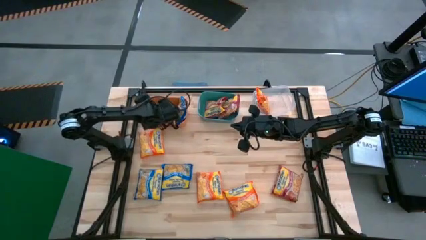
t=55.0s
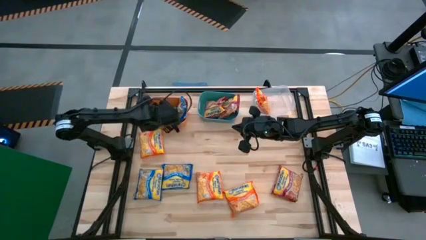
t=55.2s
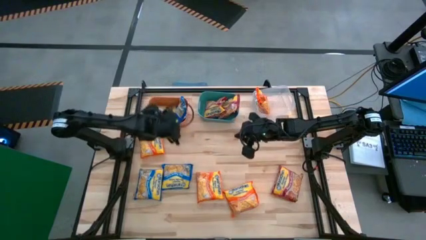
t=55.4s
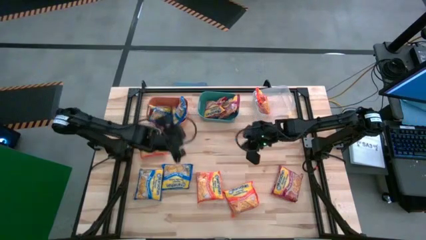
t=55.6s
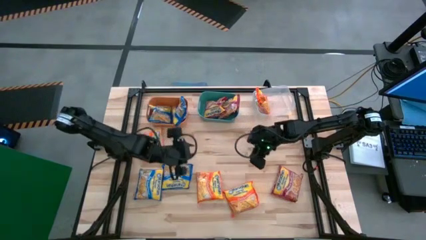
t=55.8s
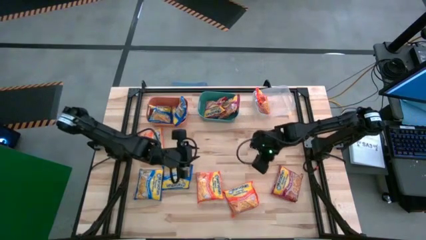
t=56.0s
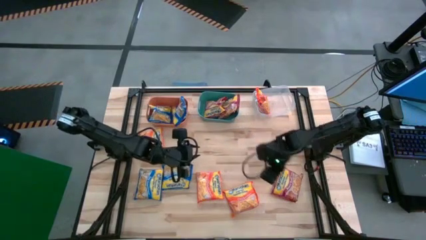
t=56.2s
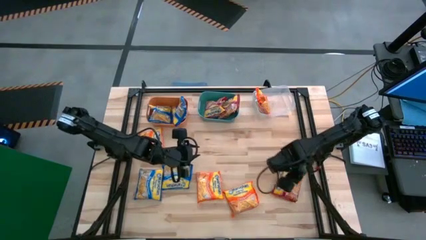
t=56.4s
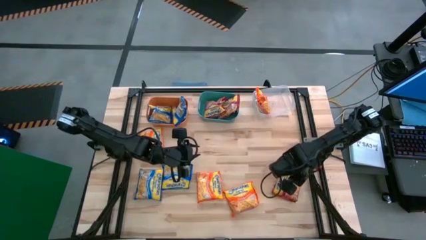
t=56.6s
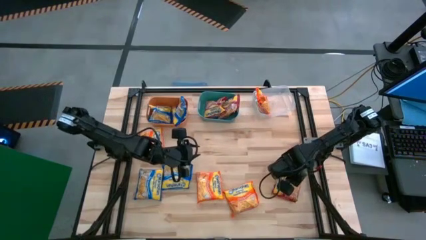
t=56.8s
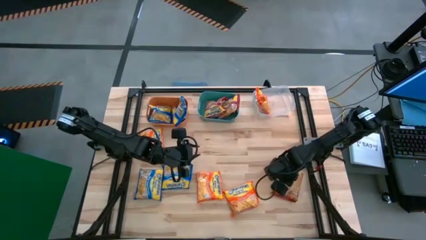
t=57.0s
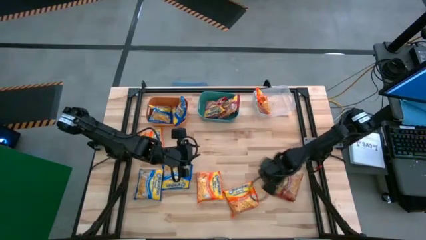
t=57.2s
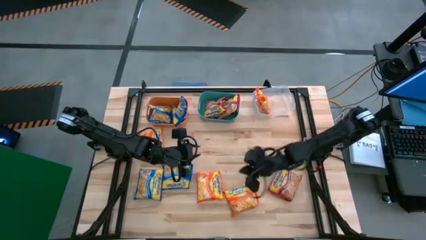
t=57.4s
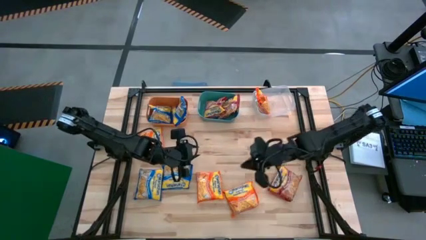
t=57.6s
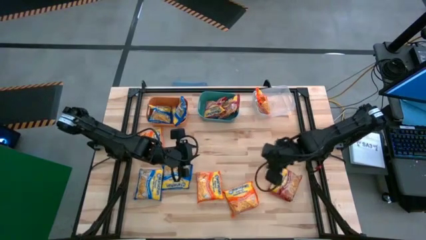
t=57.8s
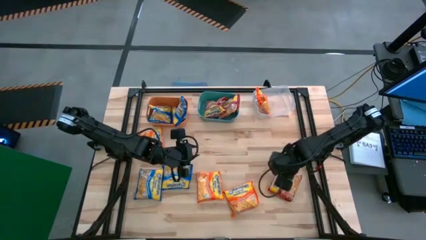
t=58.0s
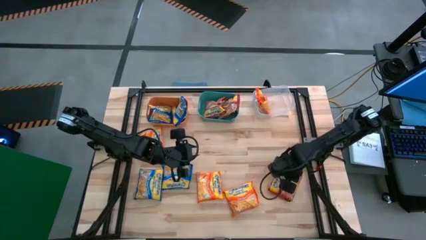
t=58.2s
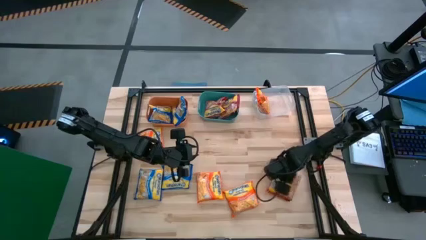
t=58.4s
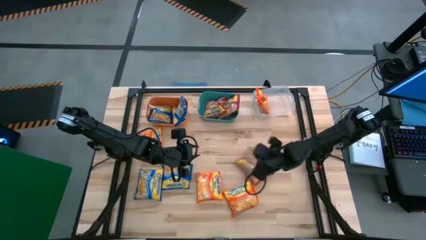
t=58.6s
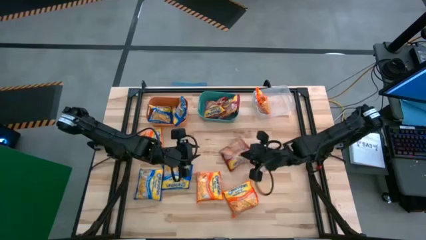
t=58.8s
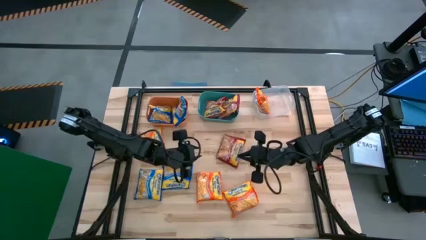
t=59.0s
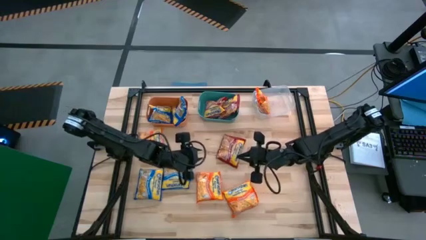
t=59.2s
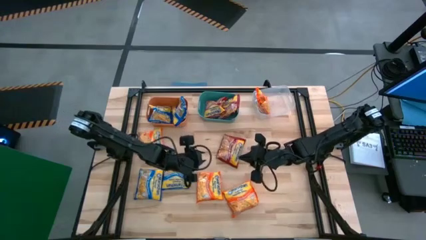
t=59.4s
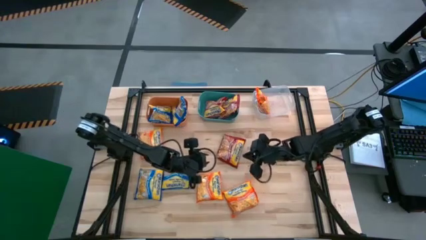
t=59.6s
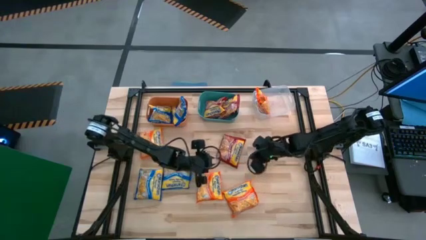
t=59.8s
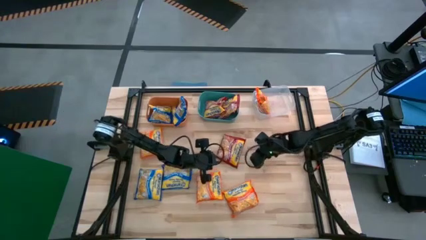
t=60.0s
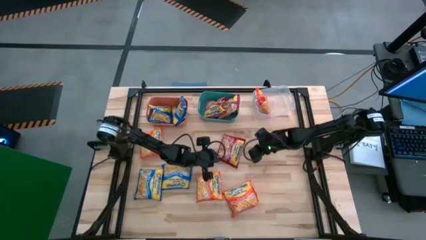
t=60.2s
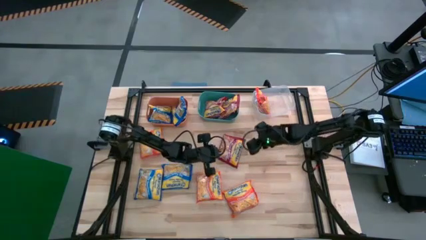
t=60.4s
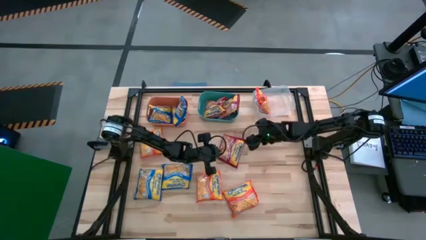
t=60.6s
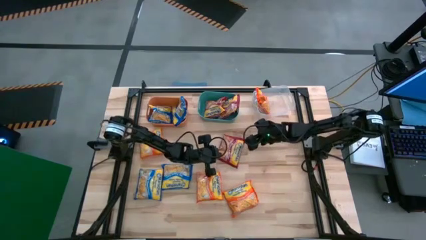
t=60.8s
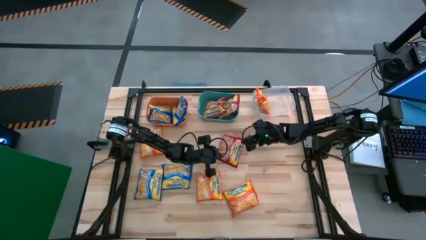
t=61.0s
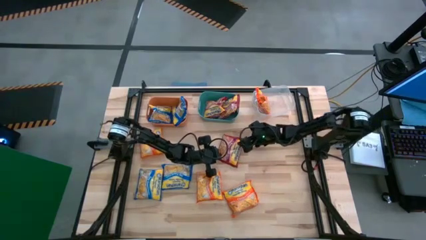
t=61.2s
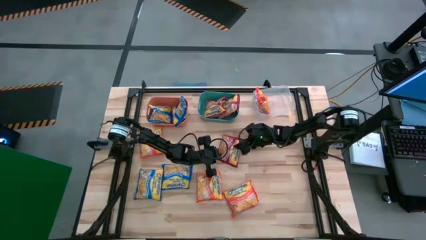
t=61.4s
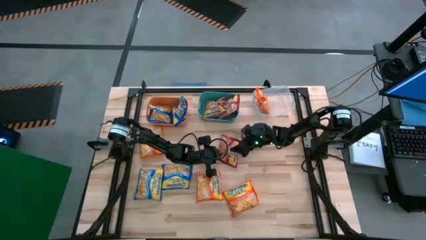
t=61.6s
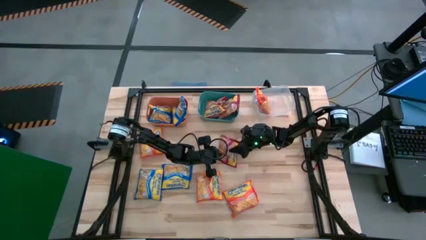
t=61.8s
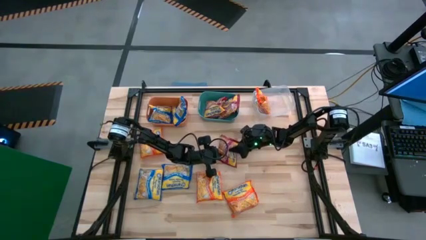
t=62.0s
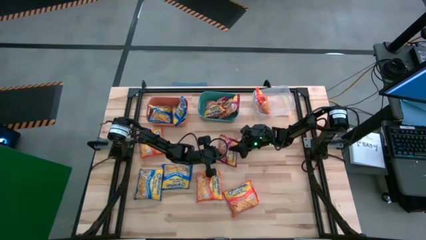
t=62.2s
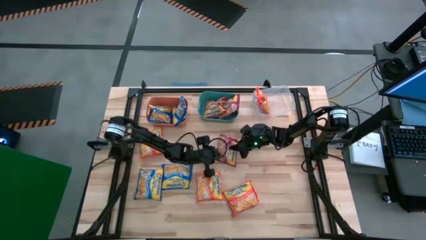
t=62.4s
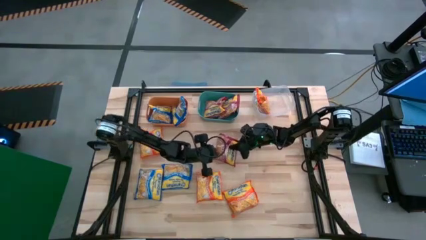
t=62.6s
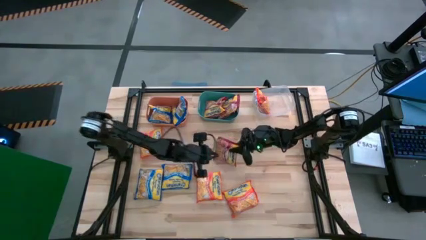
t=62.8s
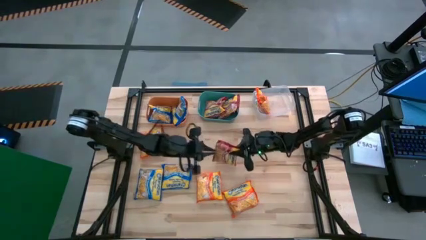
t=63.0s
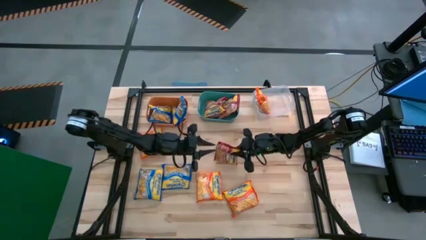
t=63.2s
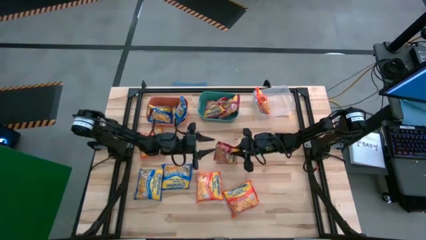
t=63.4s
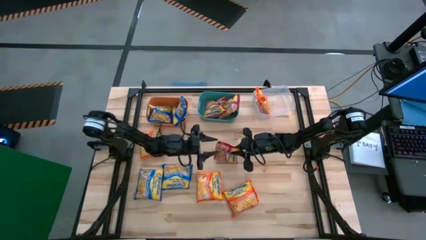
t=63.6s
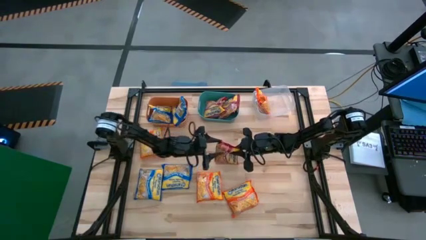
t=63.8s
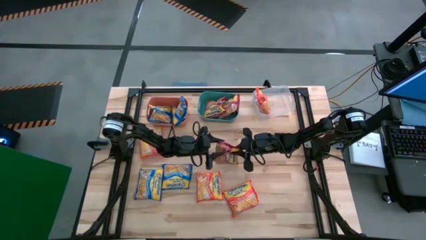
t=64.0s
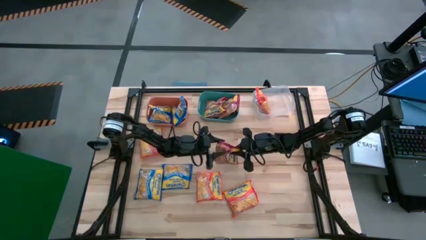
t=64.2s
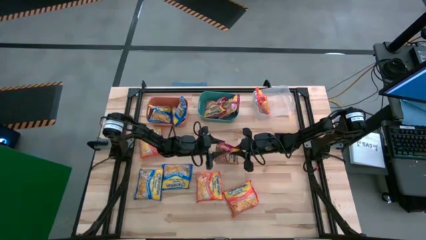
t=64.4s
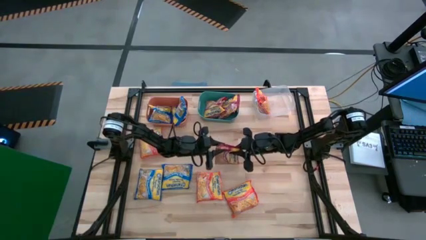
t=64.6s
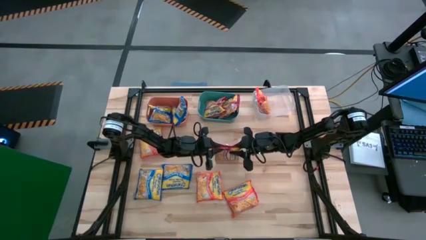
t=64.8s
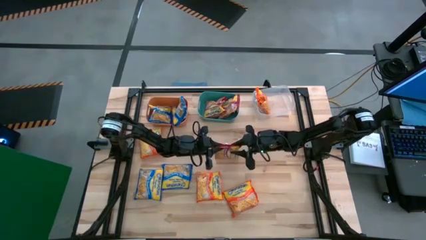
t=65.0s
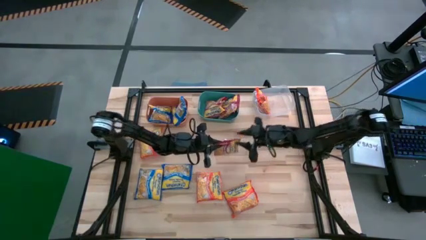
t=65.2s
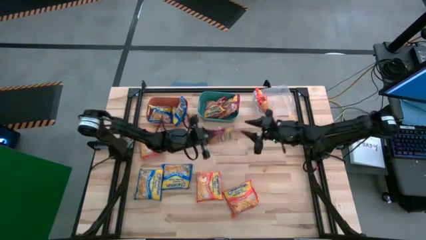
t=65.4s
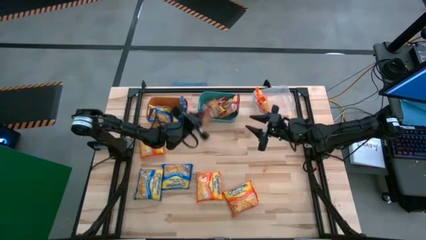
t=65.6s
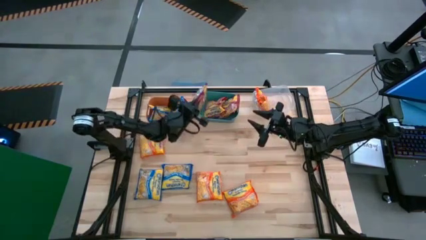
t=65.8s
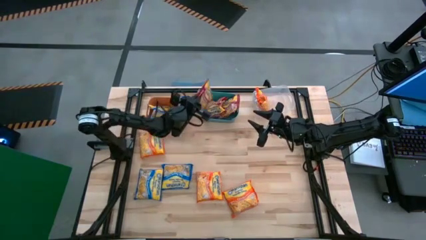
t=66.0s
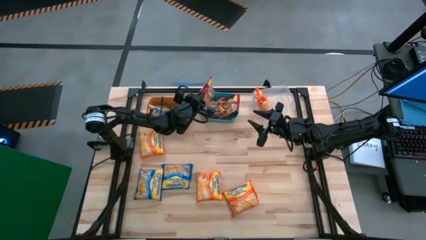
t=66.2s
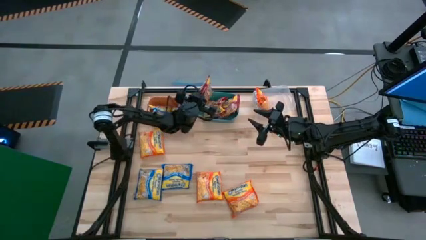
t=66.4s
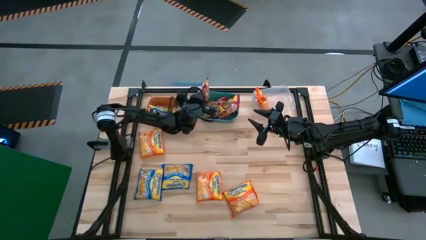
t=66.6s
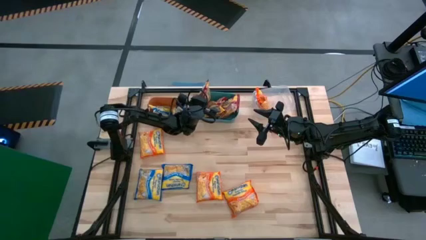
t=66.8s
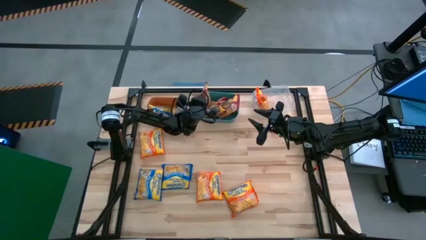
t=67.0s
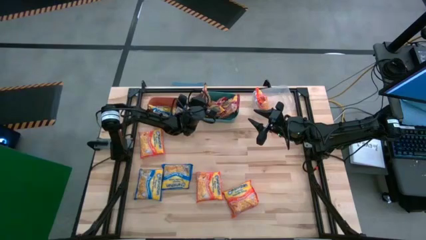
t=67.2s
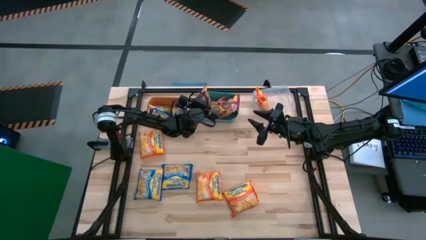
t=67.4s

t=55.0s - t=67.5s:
Task: Sort Maruchan noodles
Put the red noodle pack into the green bin

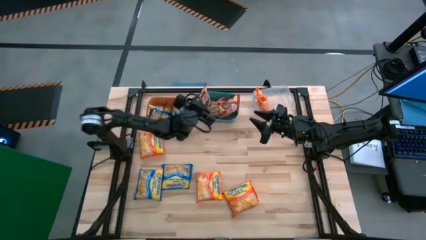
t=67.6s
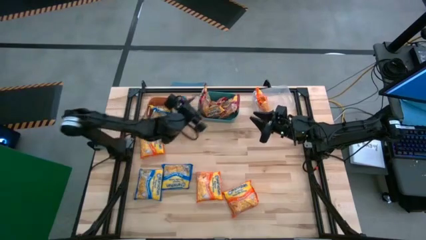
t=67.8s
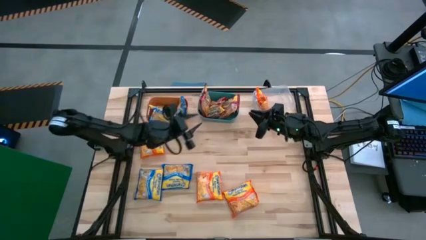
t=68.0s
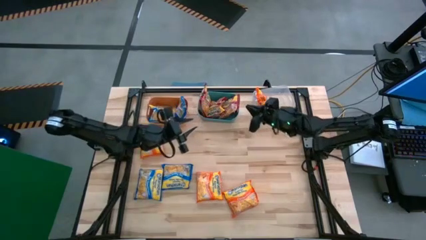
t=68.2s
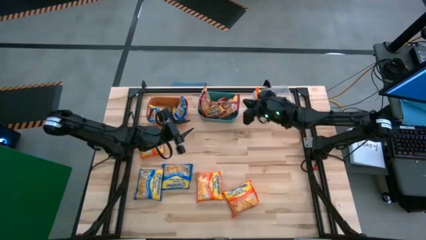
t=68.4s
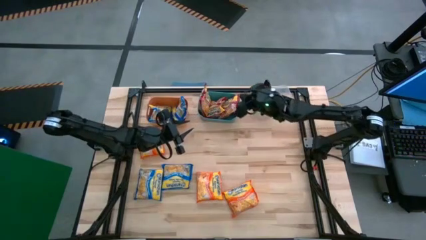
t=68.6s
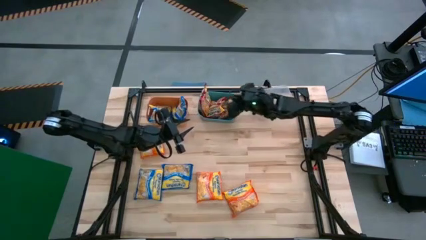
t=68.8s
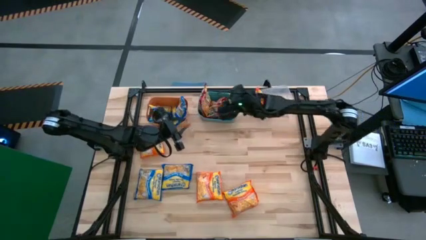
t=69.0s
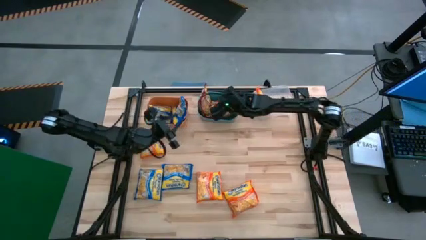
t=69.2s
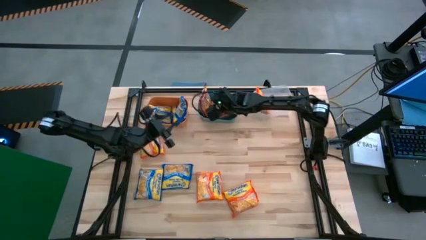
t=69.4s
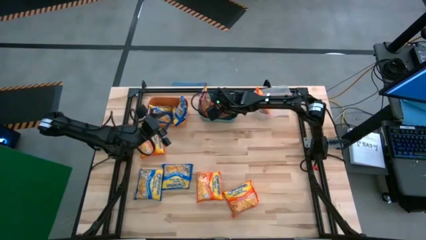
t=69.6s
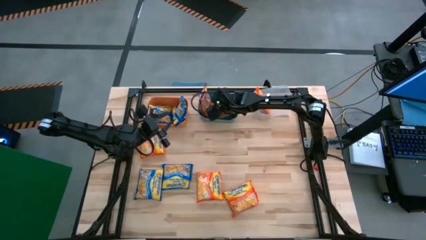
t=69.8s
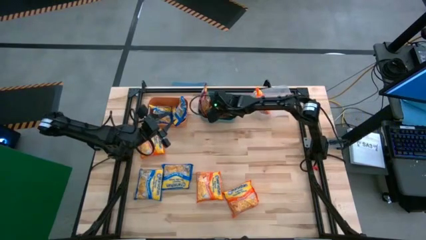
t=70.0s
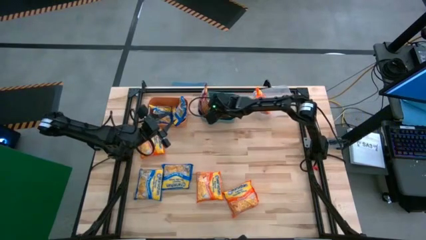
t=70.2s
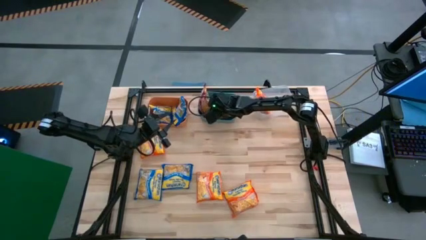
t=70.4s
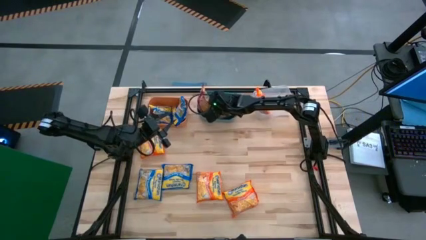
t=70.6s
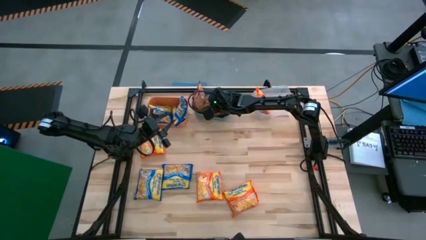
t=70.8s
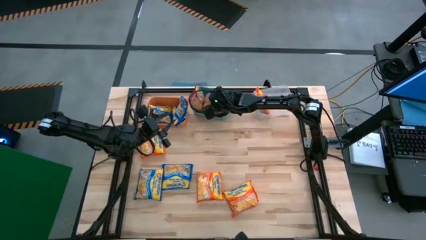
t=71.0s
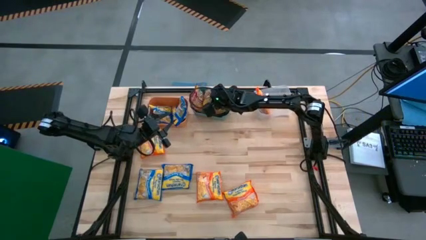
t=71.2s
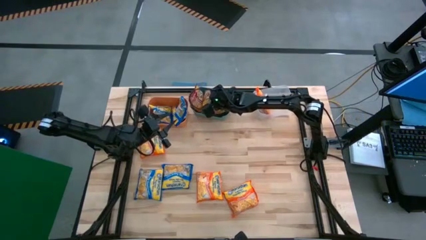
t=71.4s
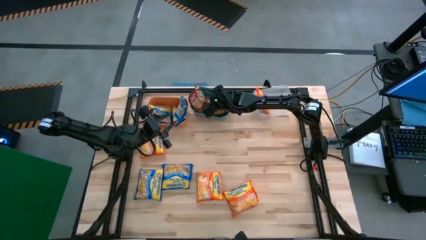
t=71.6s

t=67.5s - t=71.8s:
Adjust the red noodle pack in the green bin
